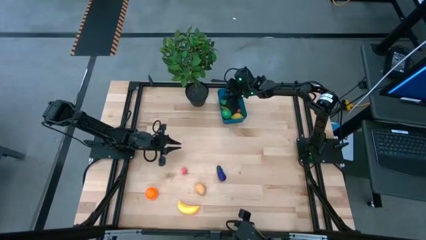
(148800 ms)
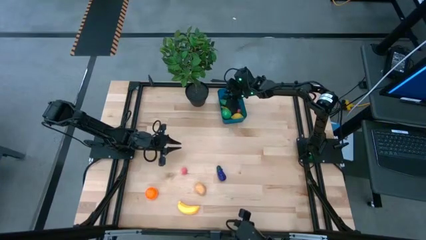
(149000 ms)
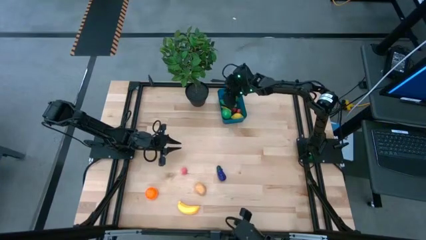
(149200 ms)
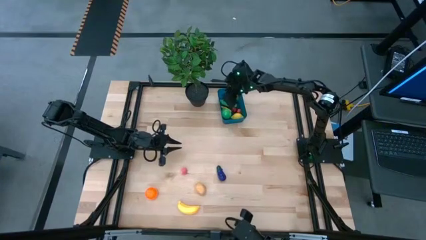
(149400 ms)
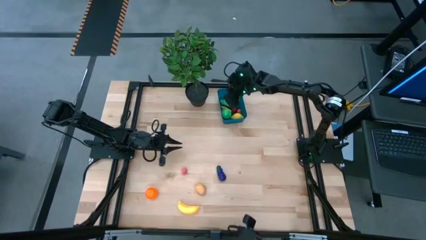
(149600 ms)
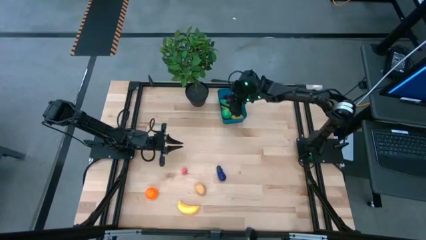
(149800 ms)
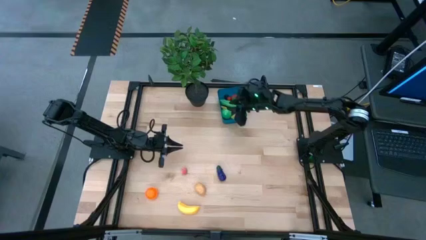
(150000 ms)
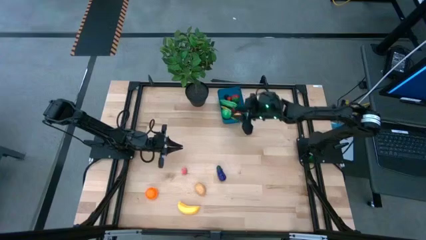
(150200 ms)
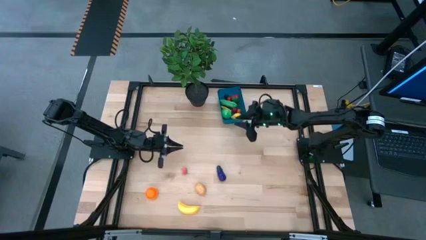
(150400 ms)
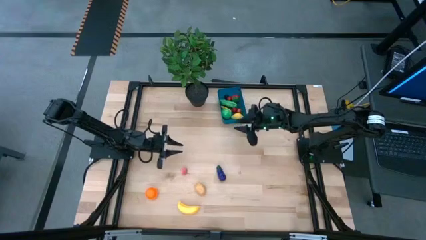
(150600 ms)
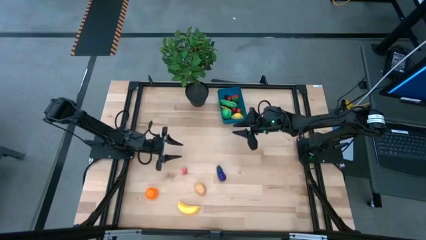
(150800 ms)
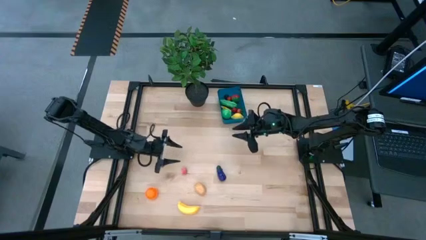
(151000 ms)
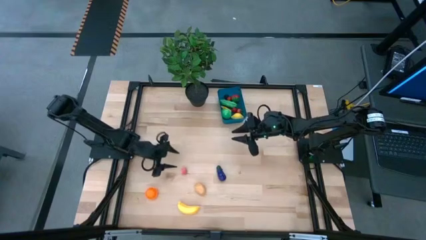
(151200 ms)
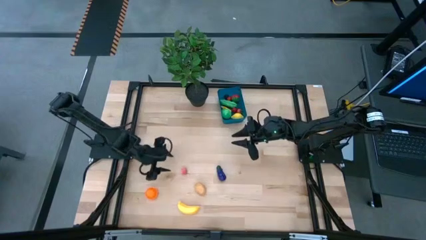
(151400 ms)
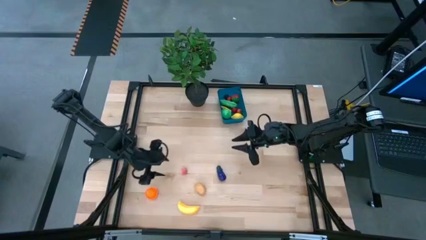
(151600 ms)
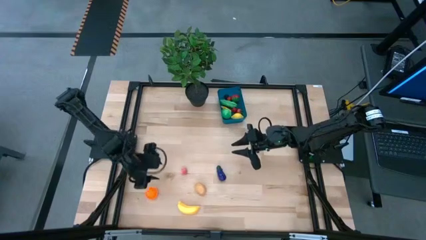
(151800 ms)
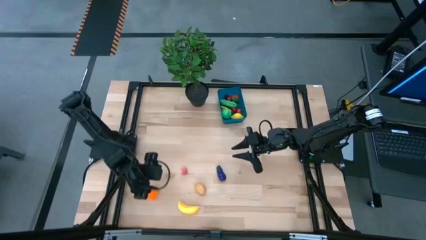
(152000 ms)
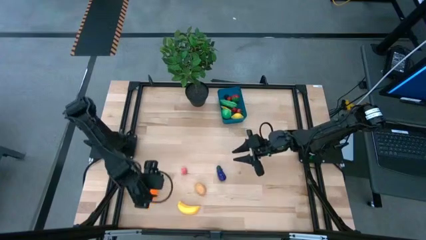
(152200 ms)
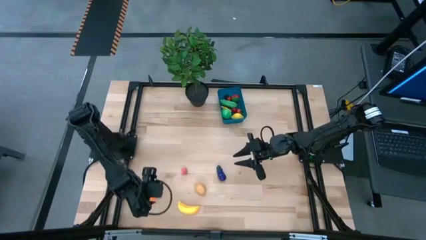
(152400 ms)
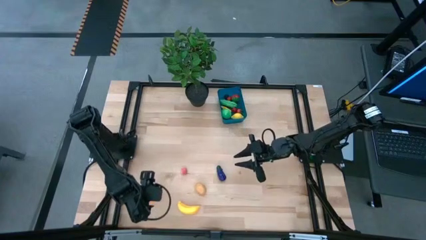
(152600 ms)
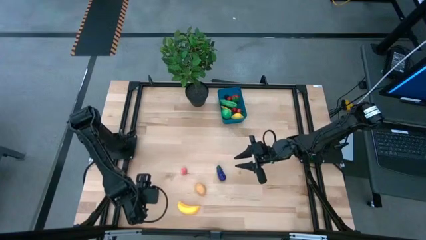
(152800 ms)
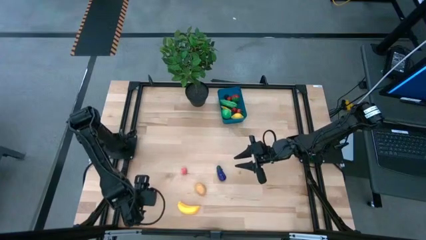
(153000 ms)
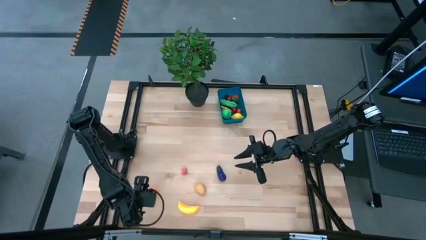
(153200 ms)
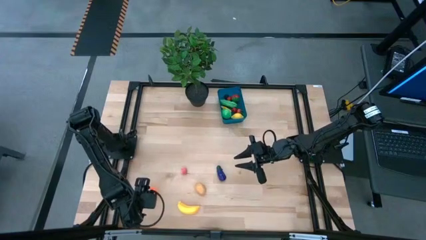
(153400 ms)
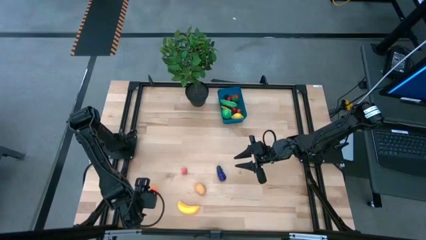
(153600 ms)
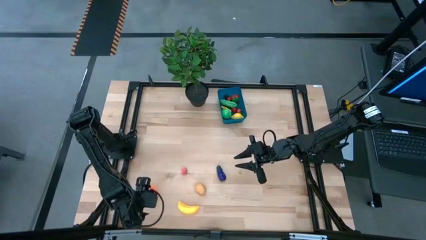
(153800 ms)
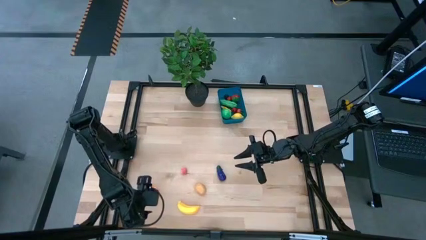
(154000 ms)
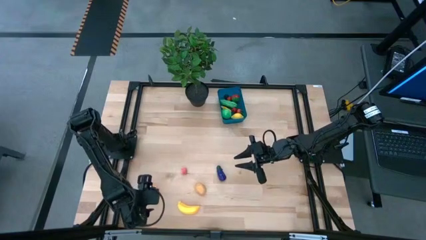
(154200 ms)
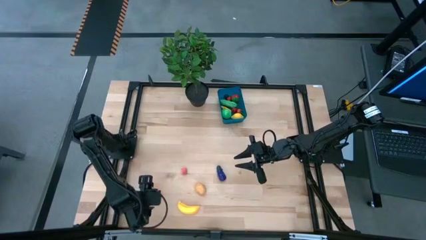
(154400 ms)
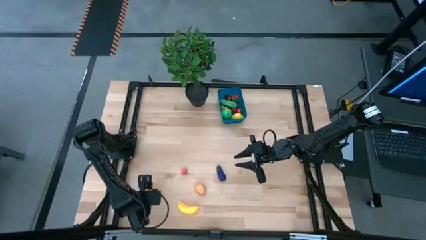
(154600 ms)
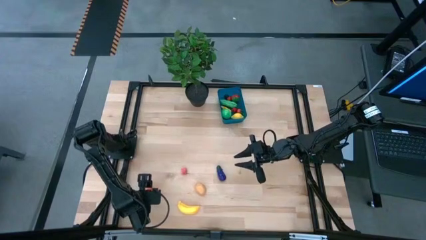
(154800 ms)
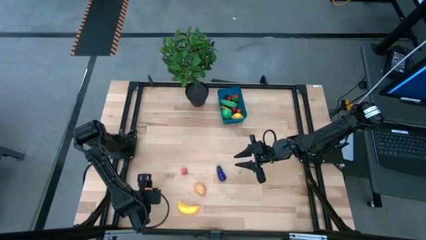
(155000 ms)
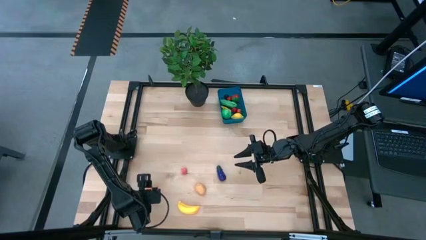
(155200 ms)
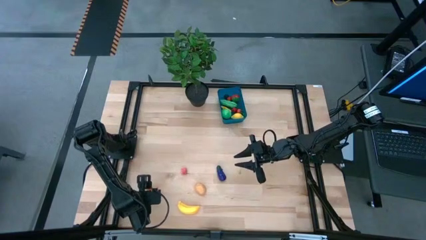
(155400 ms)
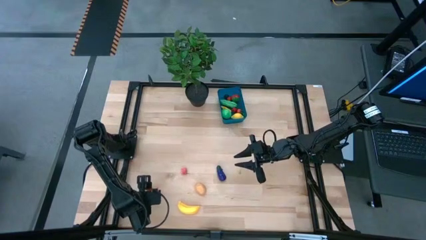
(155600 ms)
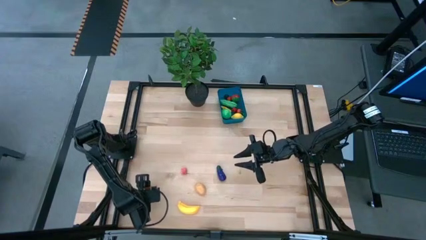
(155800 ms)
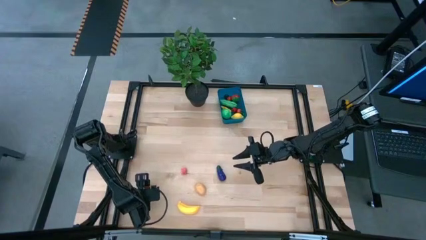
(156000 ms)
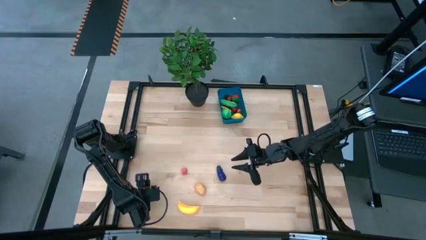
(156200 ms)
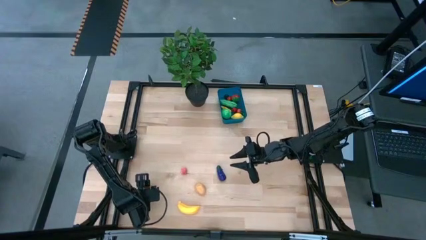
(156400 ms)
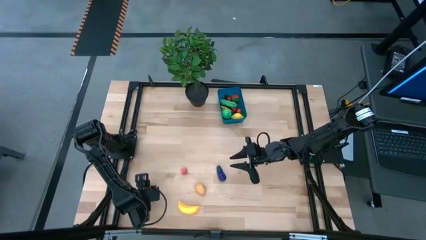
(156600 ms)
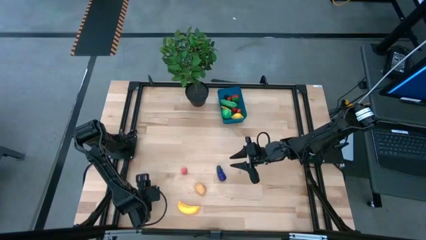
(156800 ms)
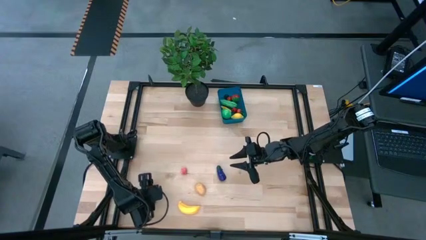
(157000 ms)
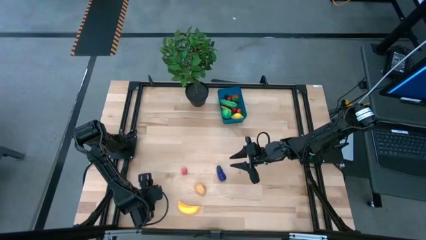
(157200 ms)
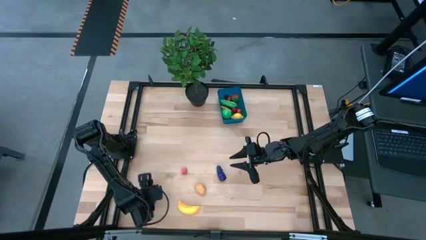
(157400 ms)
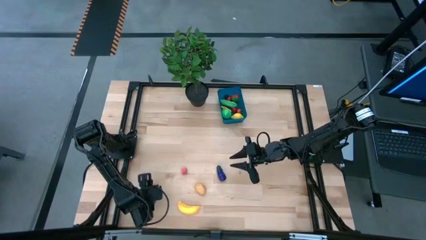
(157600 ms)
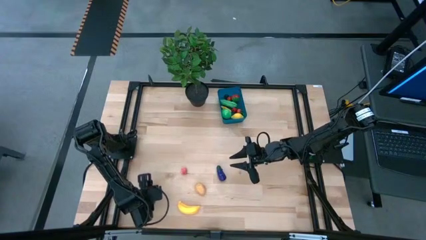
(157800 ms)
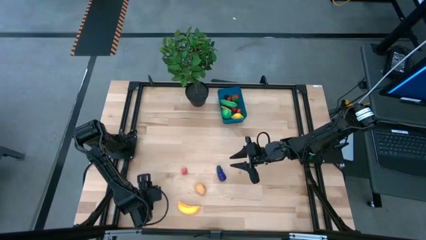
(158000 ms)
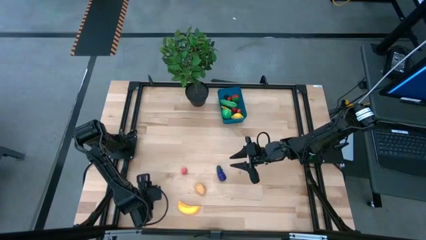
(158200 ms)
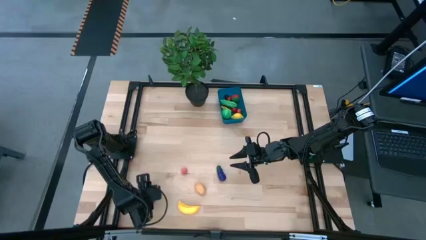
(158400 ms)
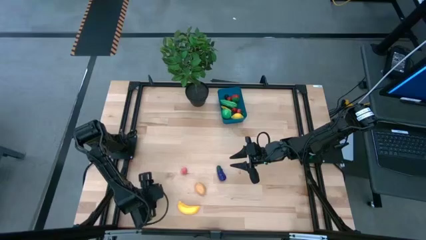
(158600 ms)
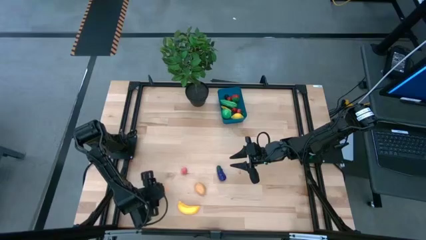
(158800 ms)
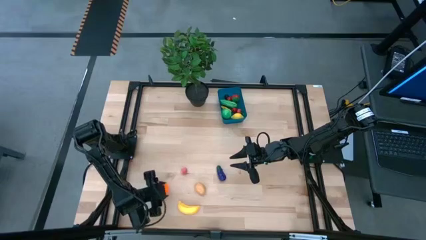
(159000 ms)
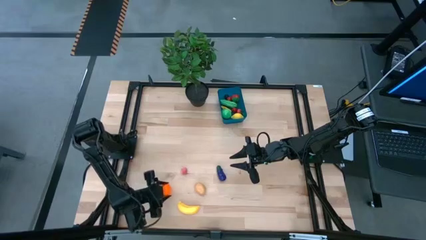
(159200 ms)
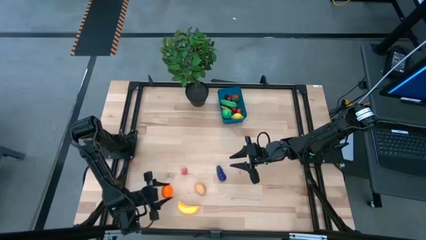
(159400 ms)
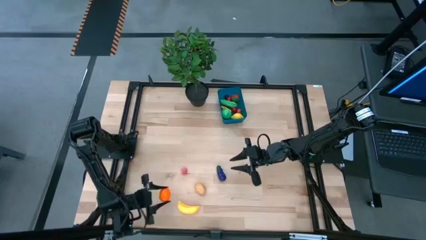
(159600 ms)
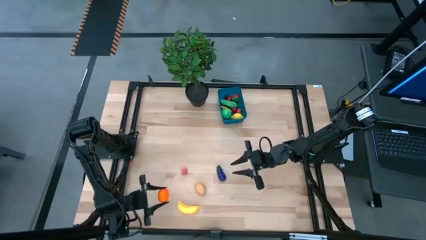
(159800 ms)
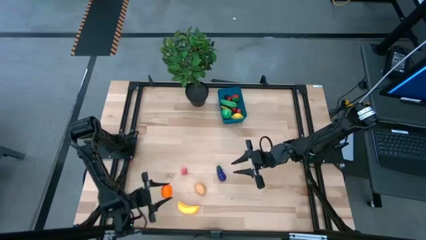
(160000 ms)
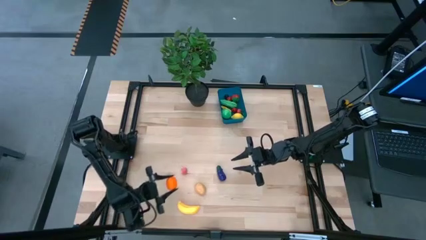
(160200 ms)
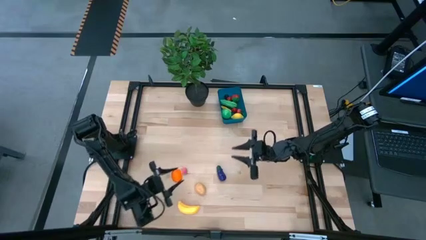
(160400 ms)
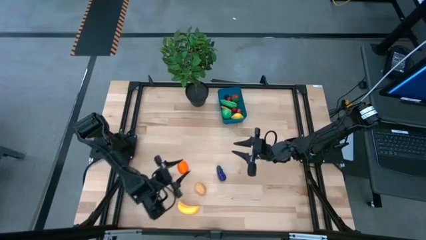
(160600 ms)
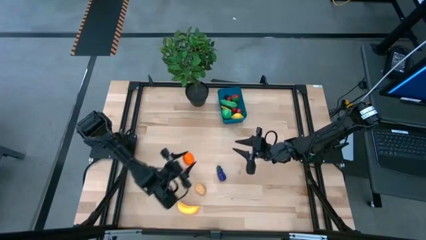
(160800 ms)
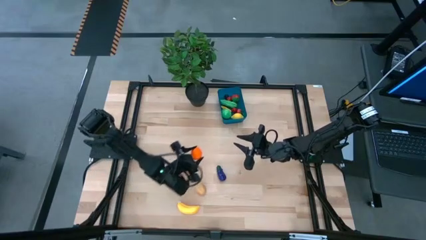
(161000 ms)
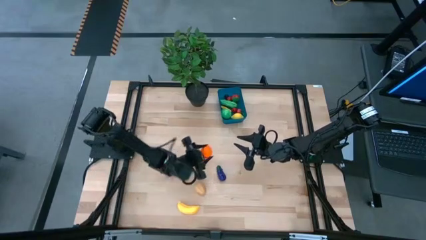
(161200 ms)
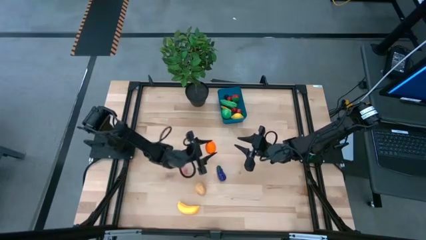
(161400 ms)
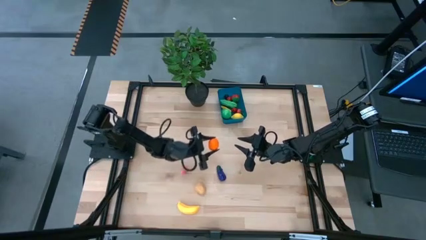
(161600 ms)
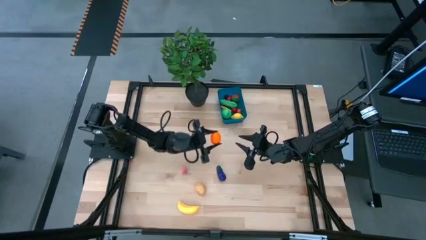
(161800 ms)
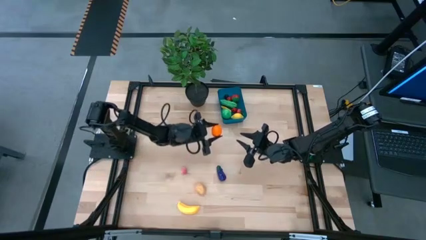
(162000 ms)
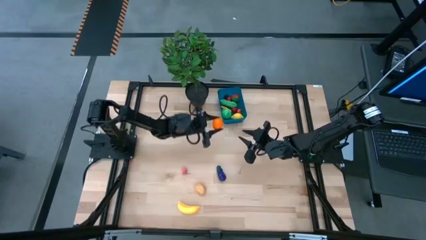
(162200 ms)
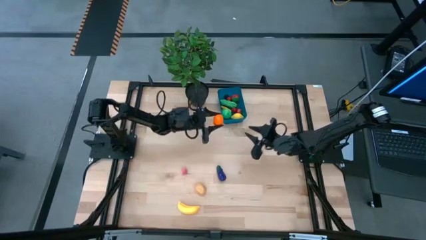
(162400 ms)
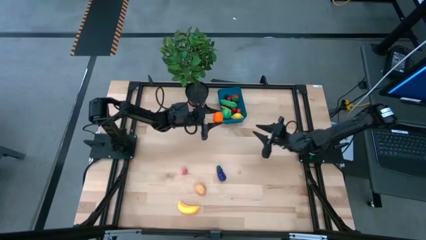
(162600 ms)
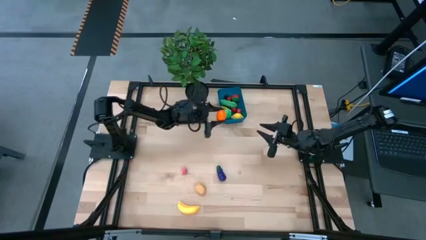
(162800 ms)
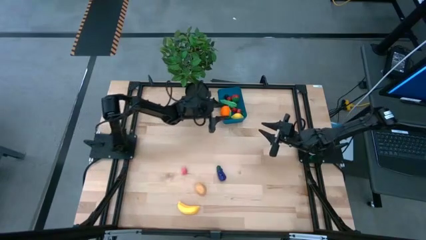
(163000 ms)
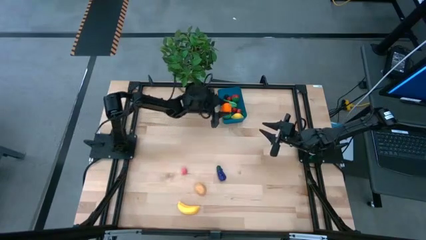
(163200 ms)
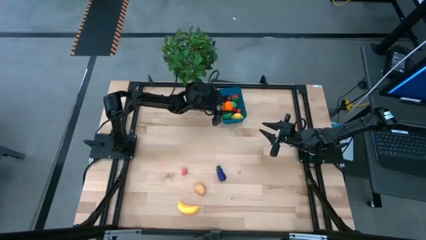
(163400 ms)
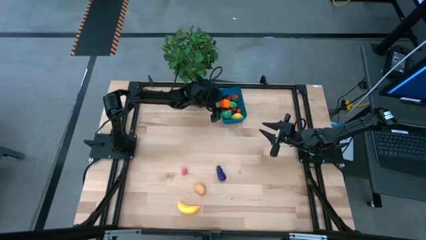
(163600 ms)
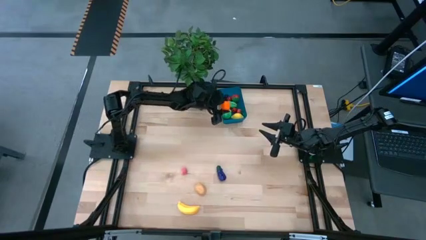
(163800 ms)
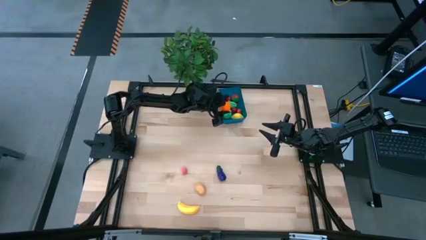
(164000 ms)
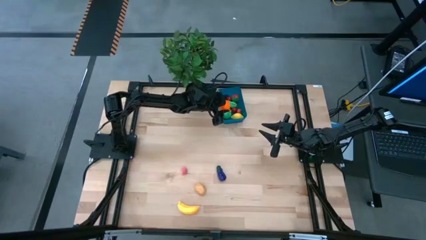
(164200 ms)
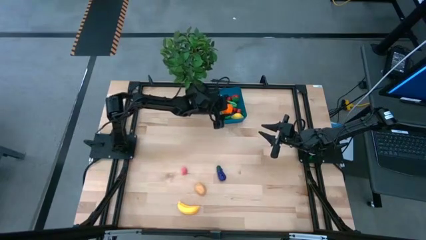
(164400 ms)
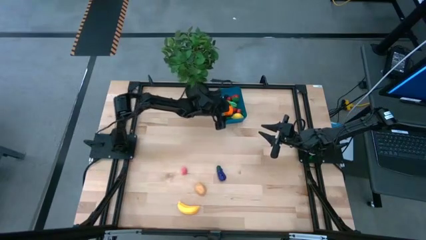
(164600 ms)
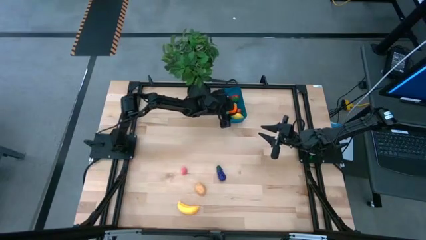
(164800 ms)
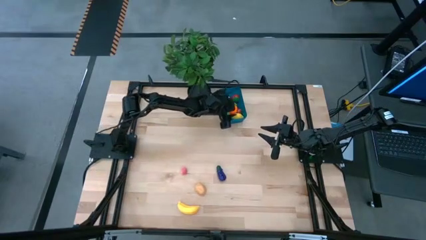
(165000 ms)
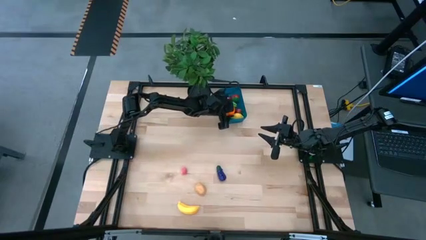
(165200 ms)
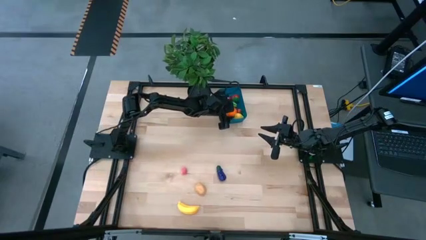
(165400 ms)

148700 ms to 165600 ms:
Task: Pick and placing Produce into tupperware
Put the pumpkin into the blue bin
